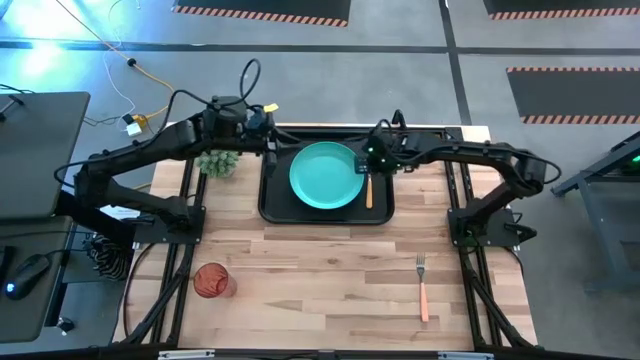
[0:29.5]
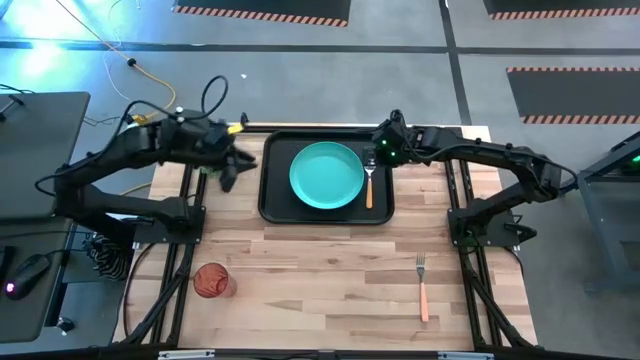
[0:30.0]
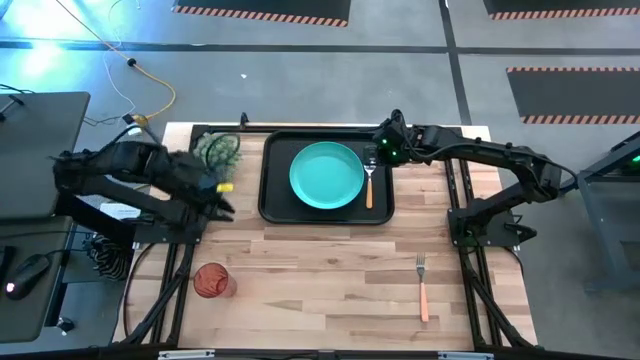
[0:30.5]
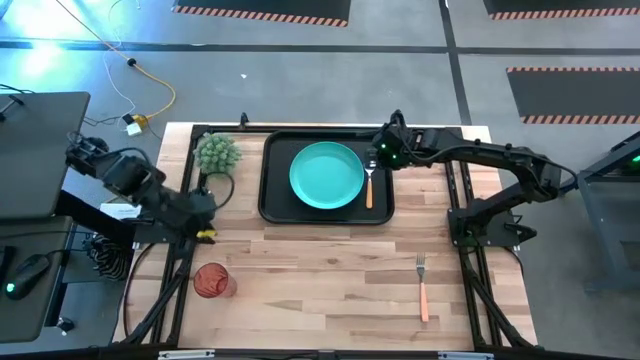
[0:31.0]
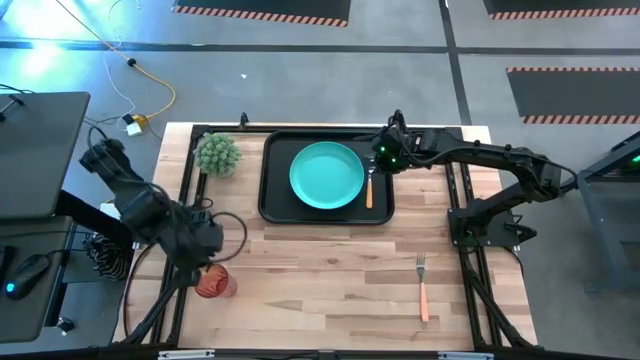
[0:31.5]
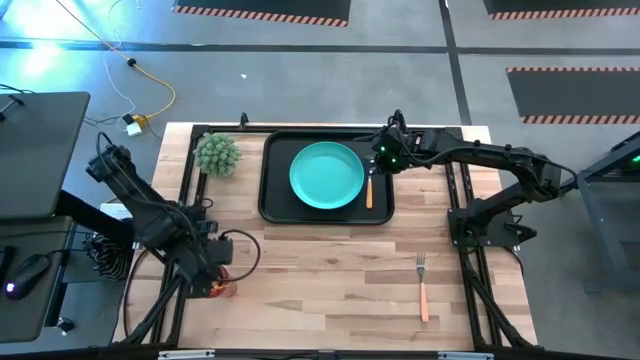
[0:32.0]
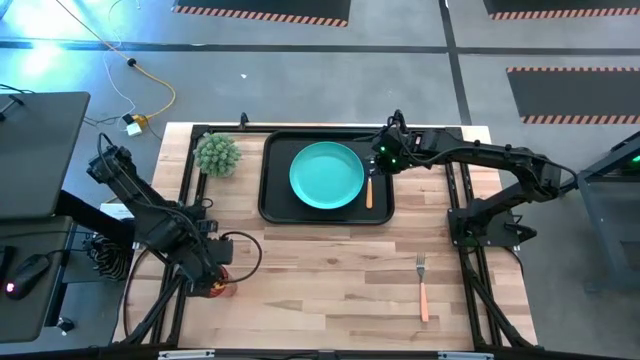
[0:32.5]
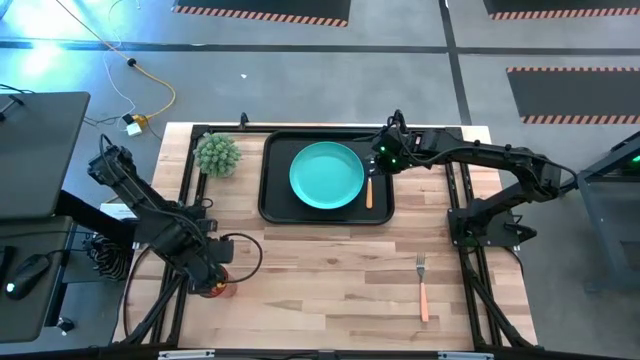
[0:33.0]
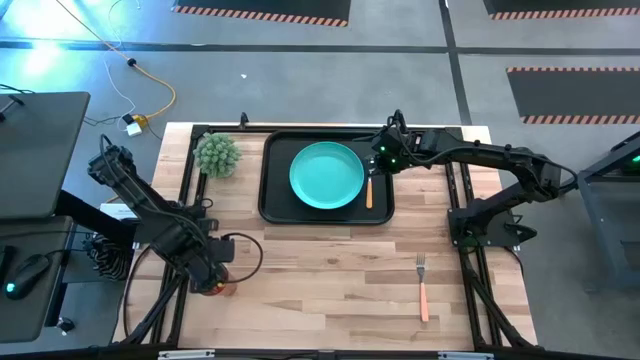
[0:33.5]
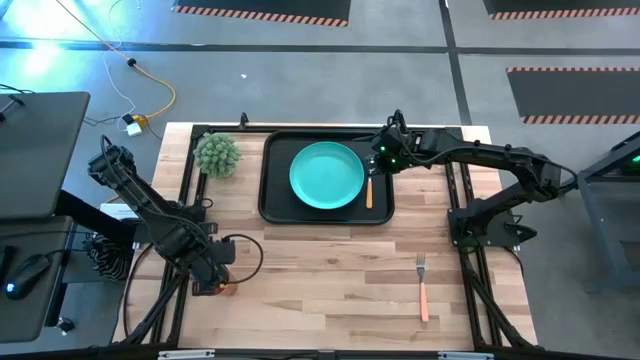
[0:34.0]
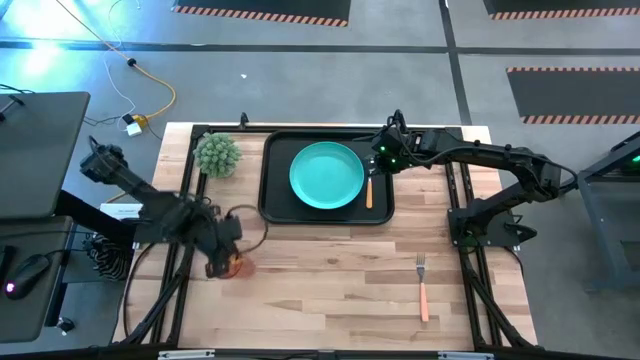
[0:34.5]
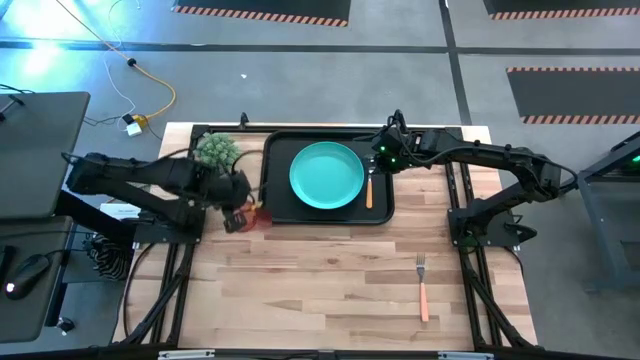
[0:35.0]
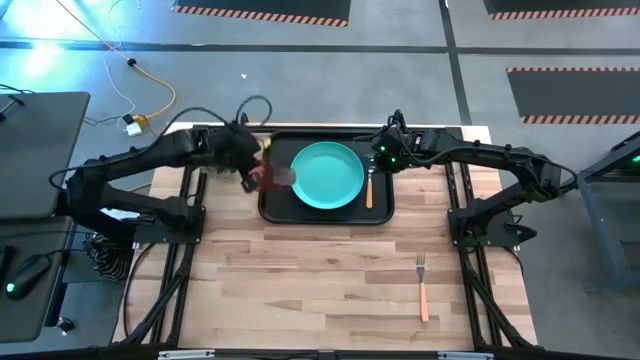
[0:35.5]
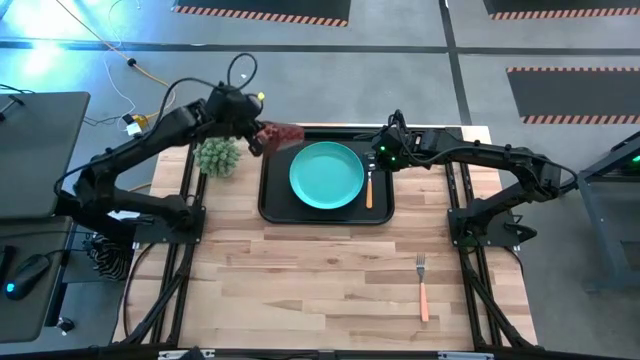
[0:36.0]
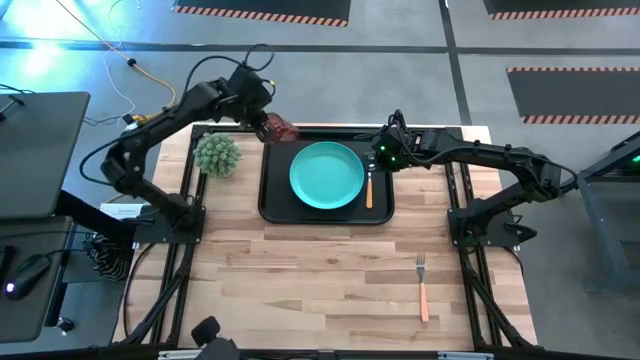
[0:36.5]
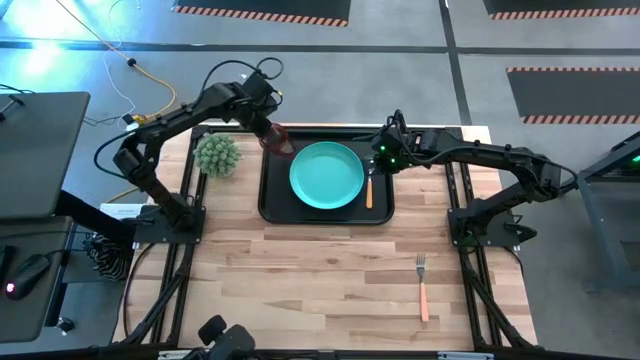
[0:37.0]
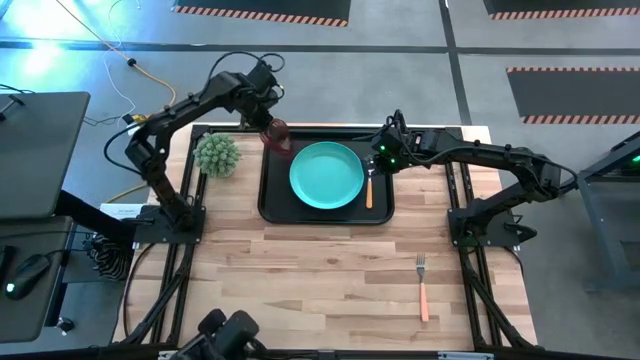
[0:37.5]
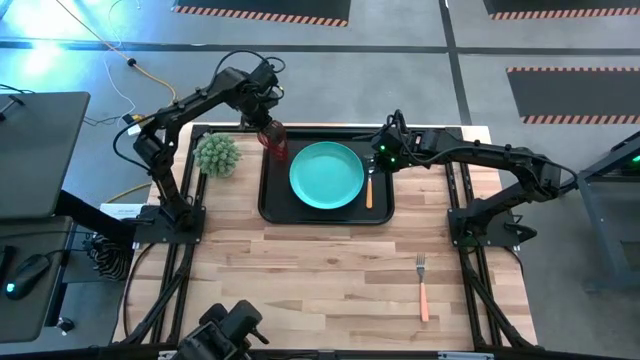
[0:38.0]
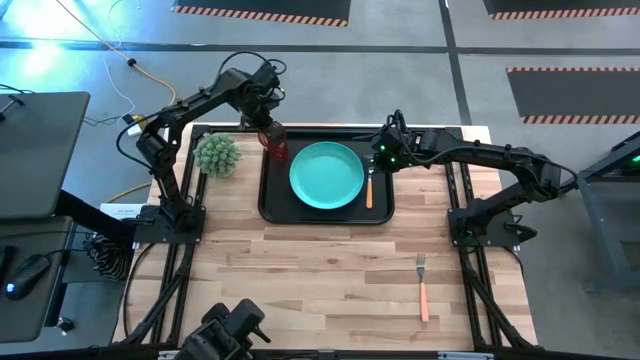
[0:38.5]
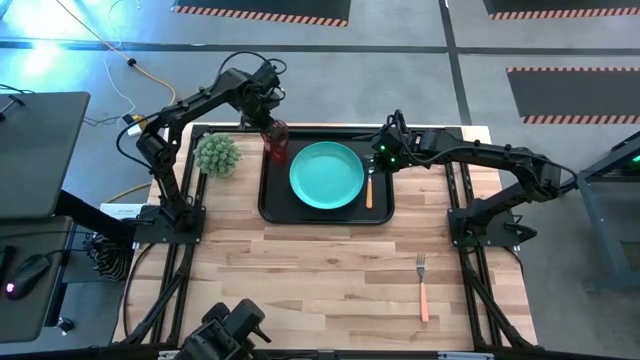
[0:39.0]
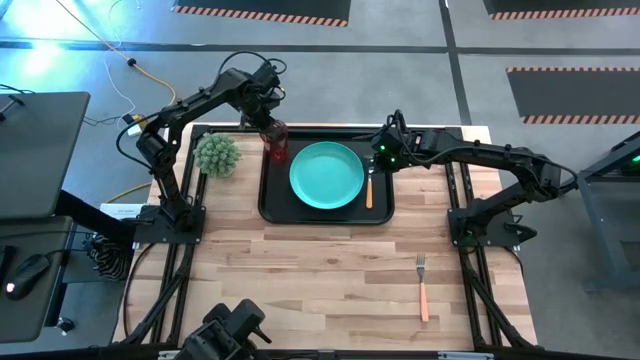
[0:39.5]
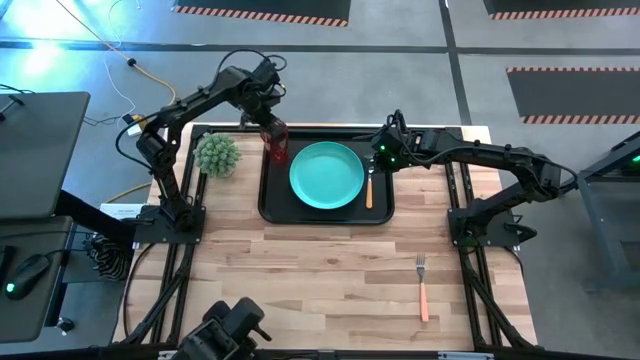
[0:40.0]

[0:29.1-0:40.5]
Task: Pick and place plate/cup/fork/spoon on tray
Put the orange glass onto the black tray

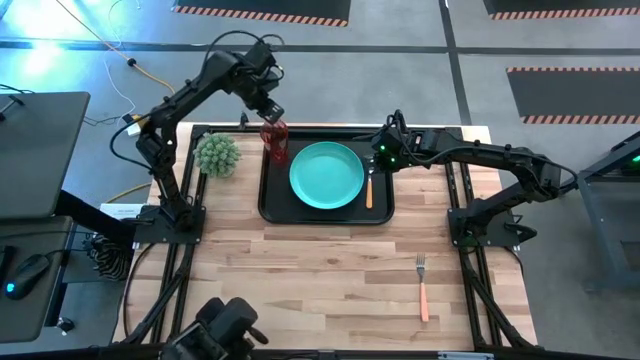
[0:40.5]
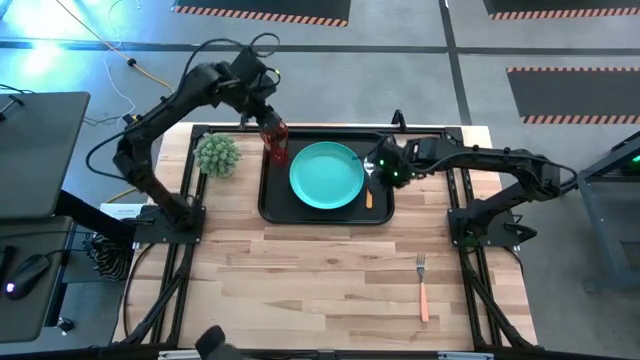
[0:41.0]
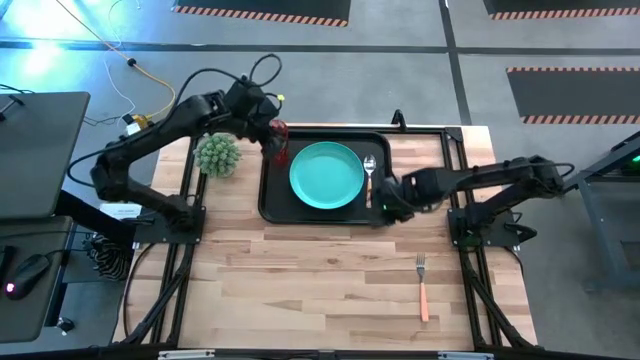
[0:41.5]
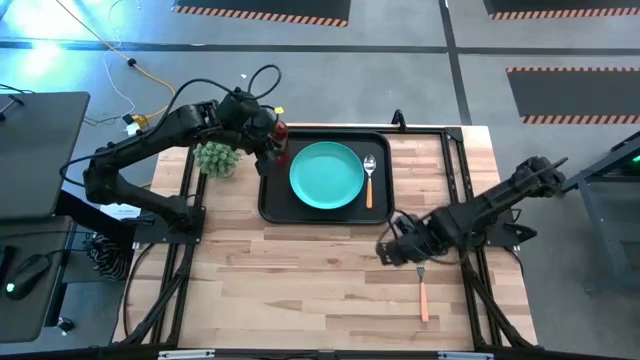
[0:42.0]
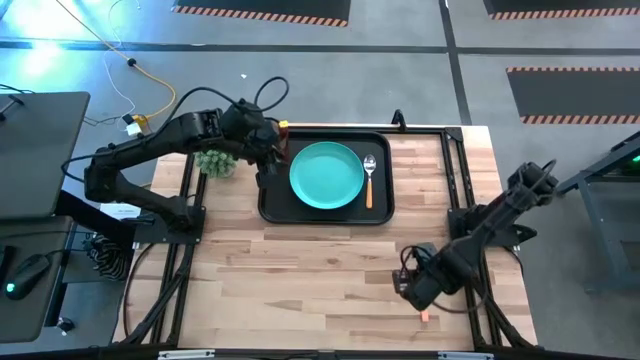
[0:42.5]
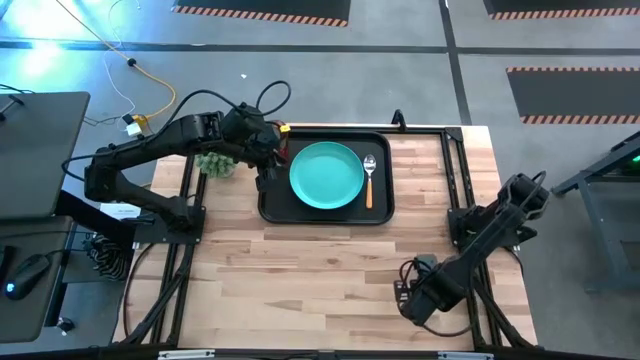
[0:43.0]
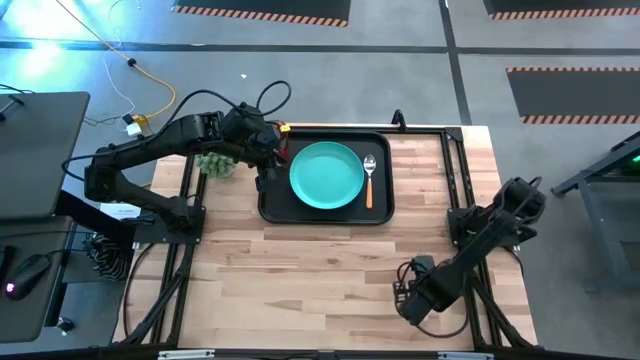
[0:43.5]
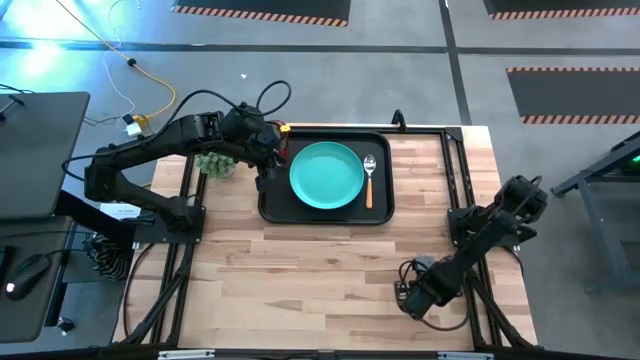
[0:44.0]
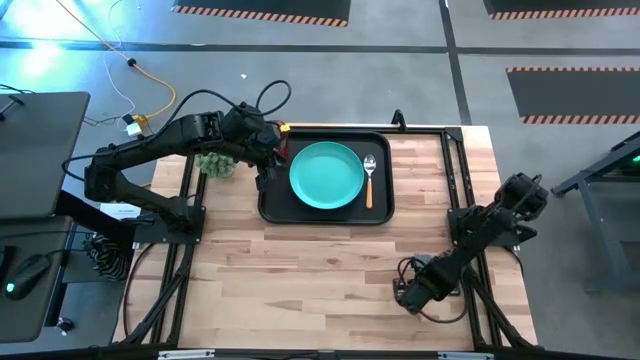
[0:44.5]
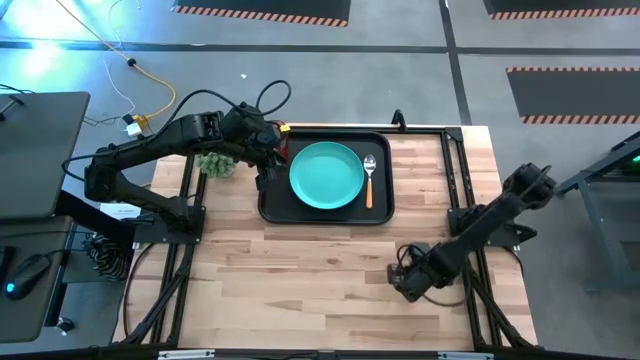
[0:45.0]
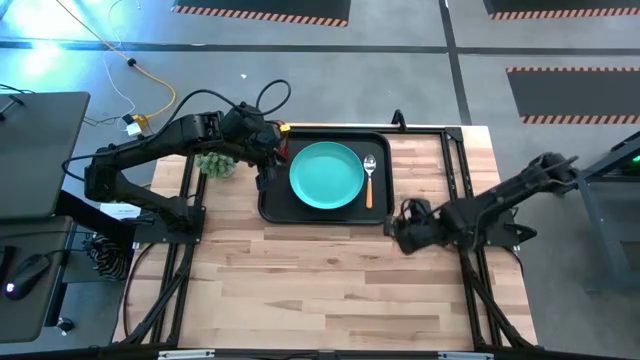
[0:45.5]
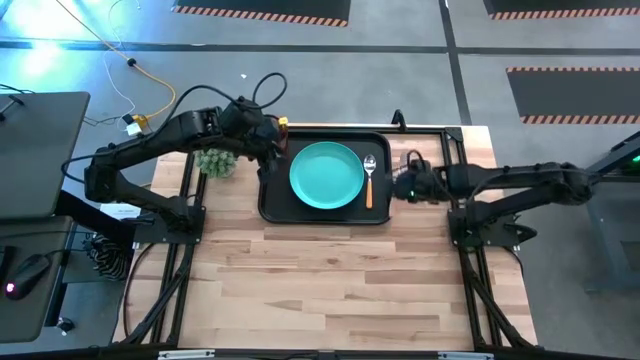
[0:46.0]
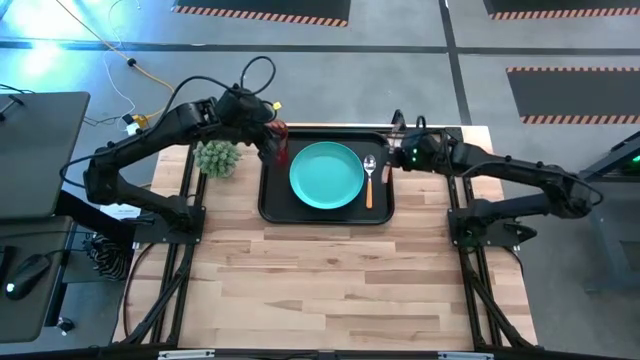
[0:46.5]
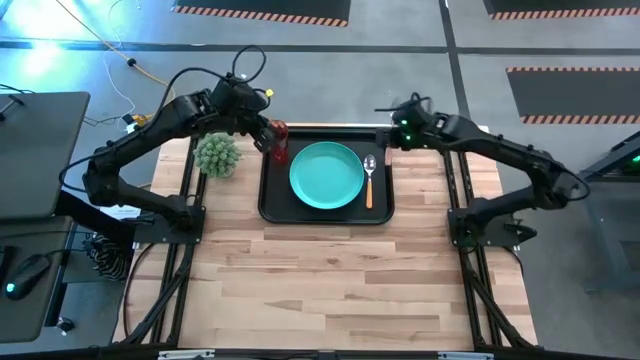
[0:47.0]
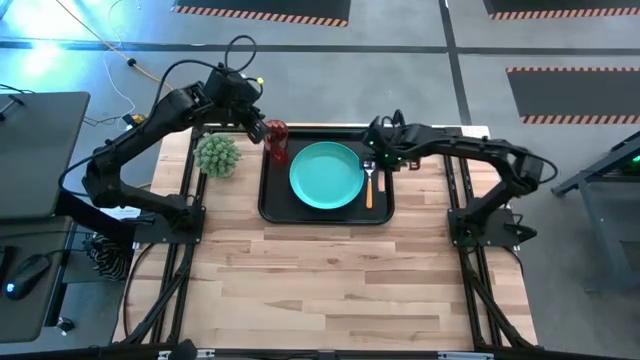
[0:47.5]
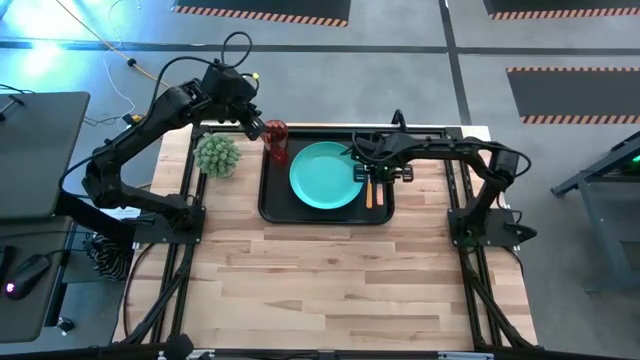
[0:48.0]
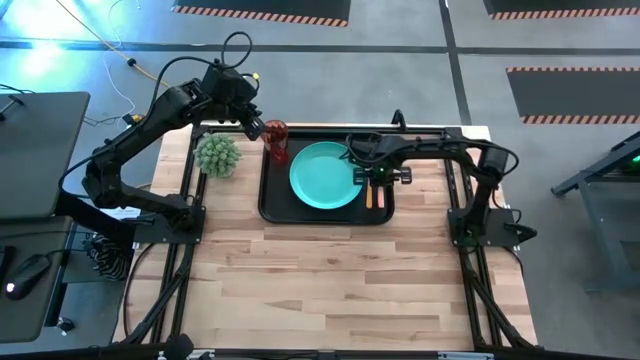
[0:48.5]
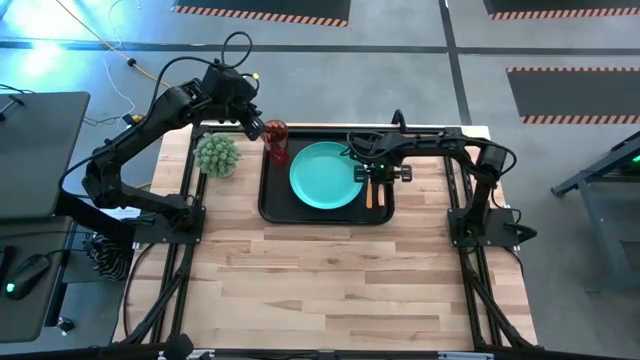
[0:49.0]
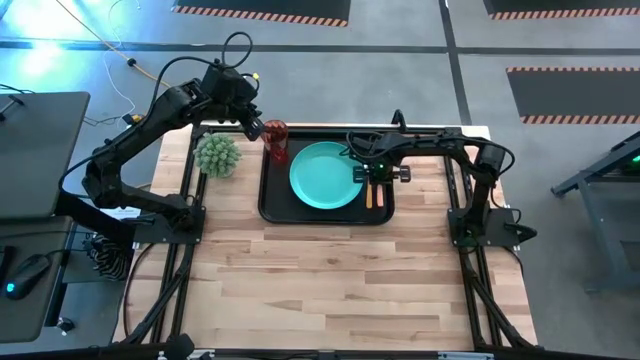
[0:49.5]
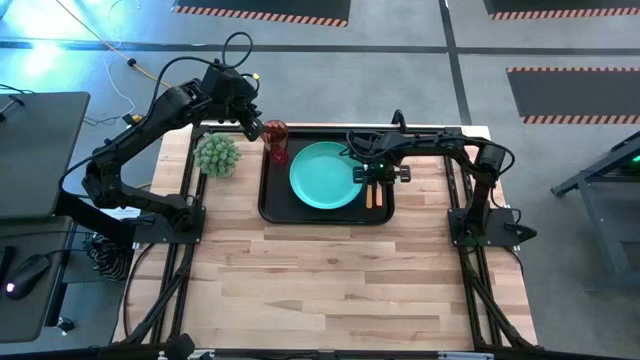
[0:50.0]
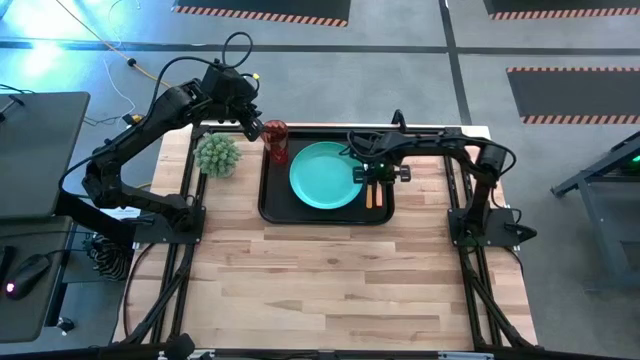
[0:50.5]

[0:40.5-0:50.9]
Put the fork onto the black tray

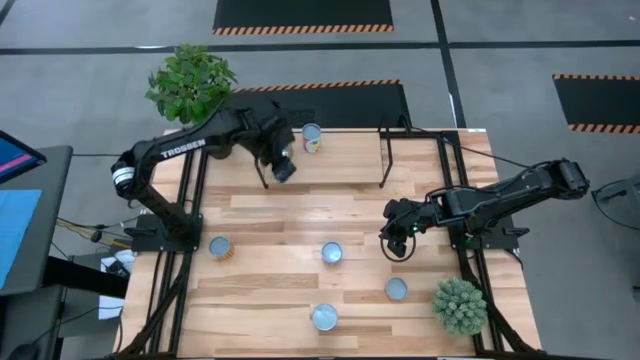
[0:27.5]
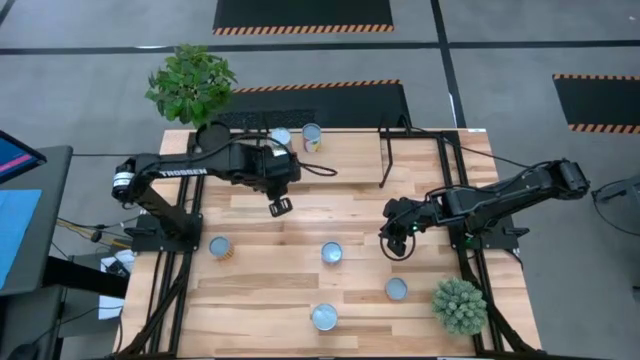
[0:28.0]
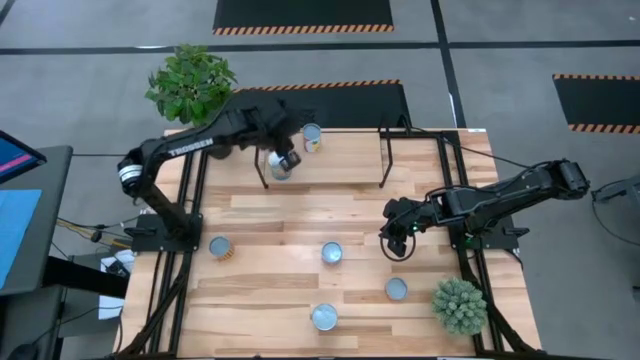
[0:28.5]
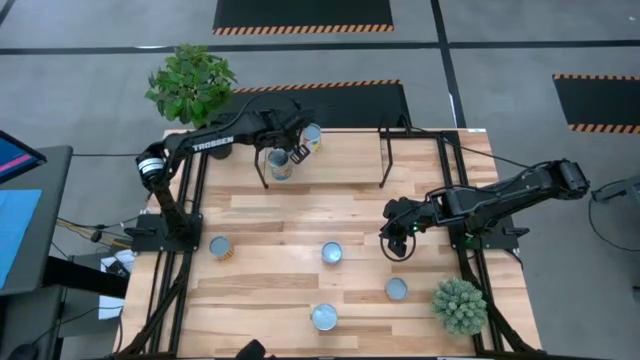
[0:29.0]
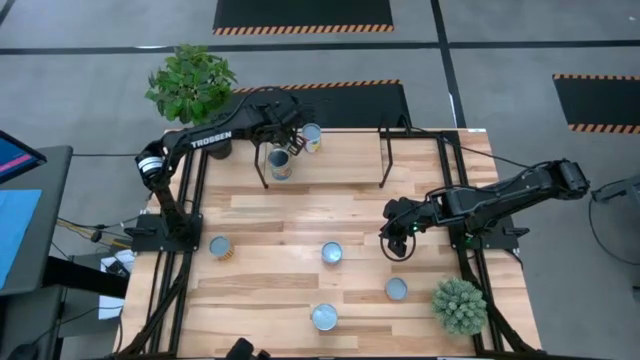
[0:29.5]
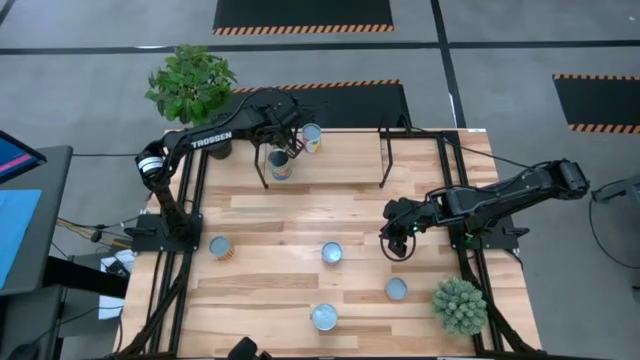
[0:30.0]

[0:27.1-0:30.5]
Task: Pick and place cans onto a shelf
Adjust the canned pears on the shelf
